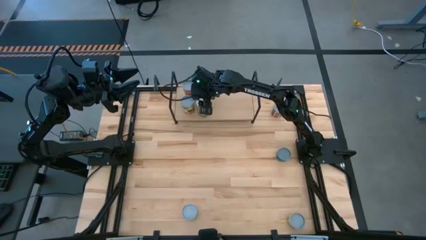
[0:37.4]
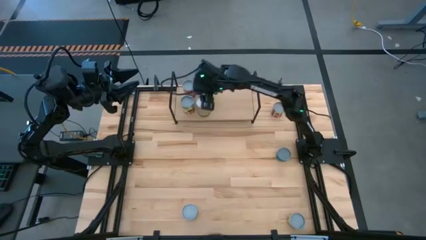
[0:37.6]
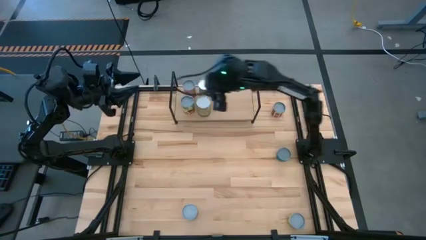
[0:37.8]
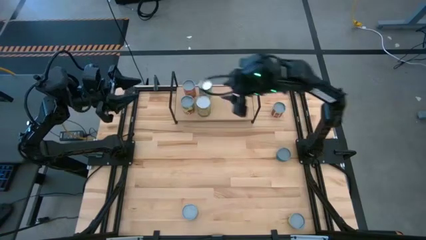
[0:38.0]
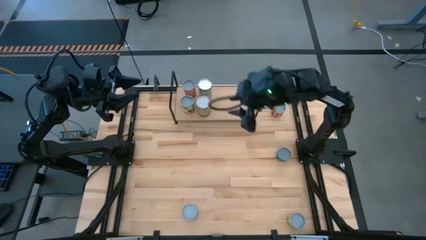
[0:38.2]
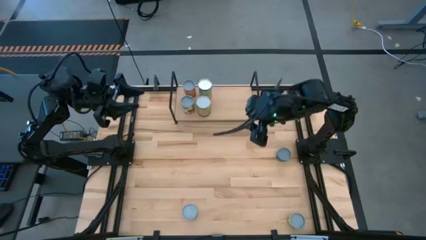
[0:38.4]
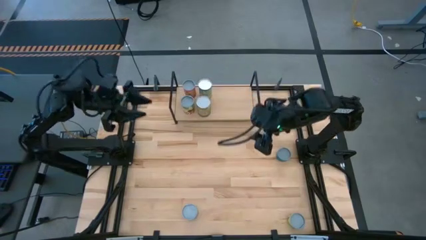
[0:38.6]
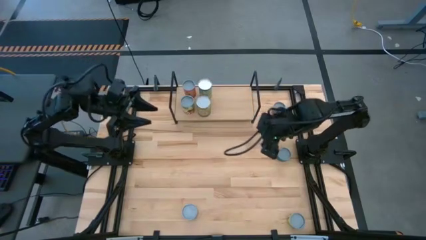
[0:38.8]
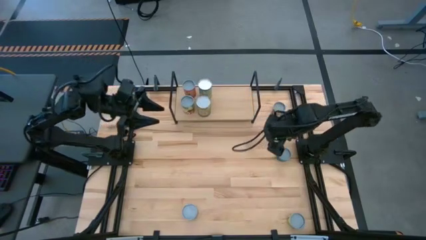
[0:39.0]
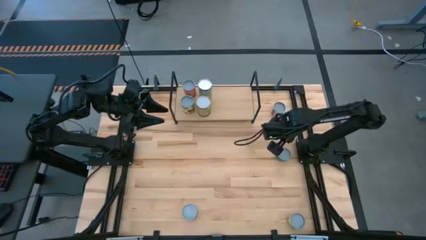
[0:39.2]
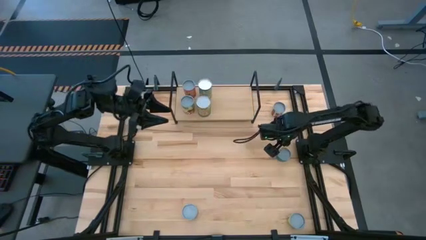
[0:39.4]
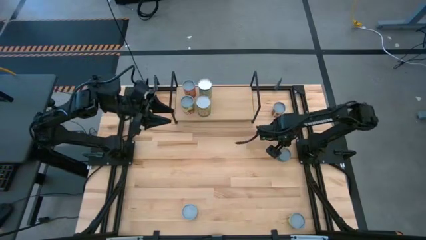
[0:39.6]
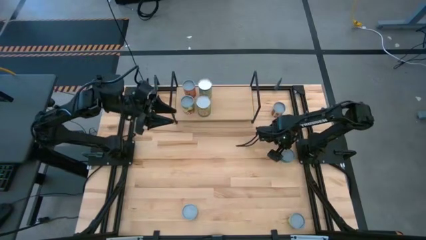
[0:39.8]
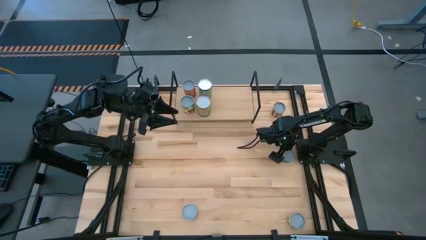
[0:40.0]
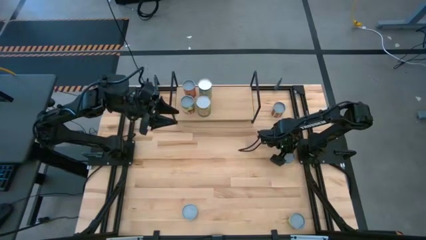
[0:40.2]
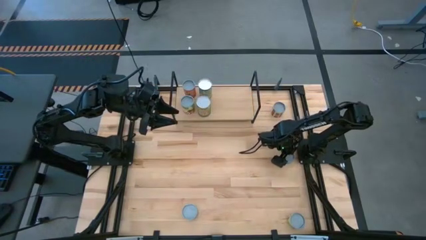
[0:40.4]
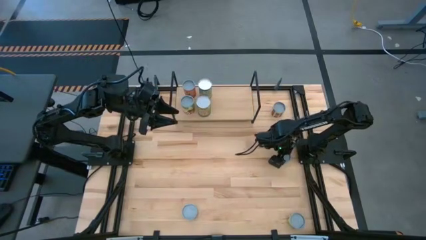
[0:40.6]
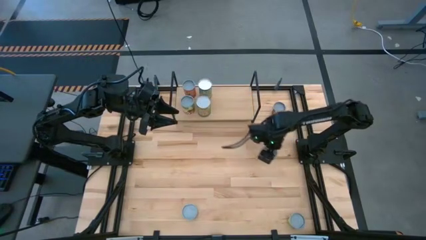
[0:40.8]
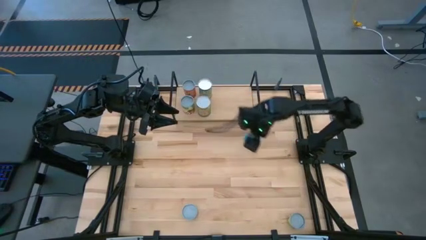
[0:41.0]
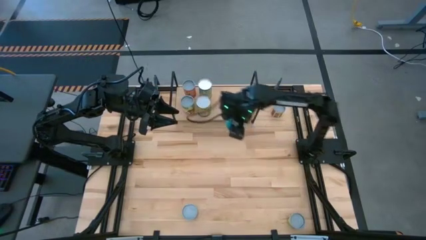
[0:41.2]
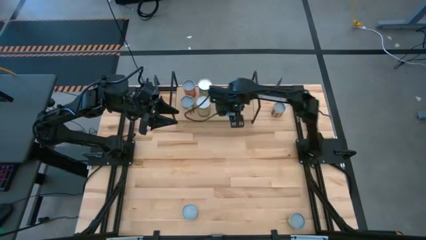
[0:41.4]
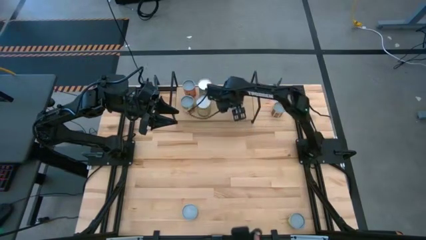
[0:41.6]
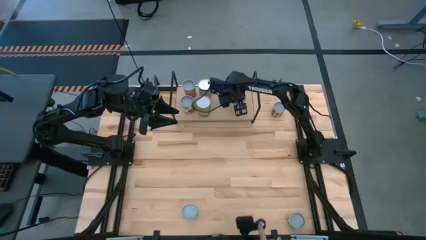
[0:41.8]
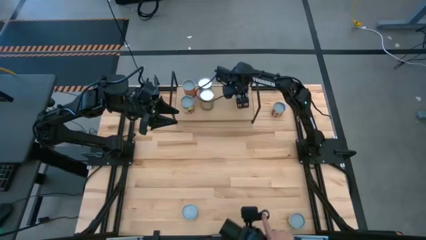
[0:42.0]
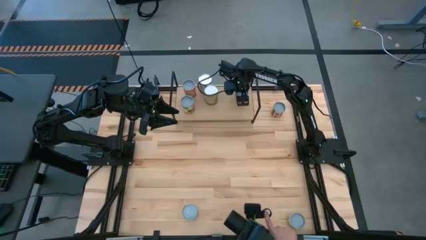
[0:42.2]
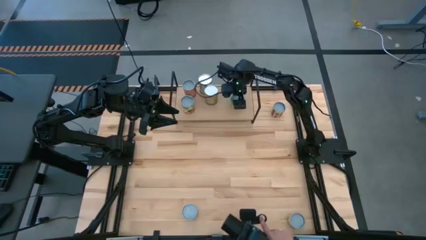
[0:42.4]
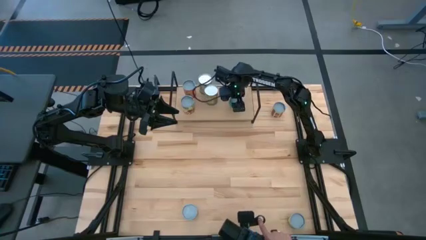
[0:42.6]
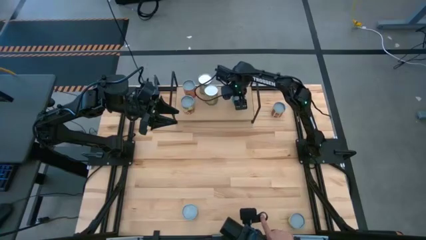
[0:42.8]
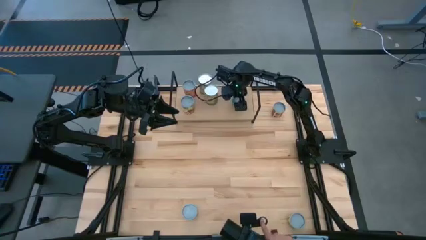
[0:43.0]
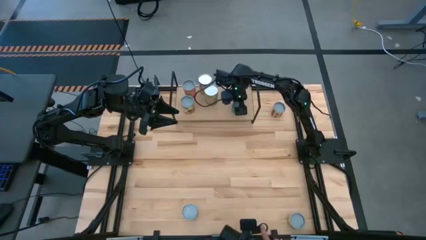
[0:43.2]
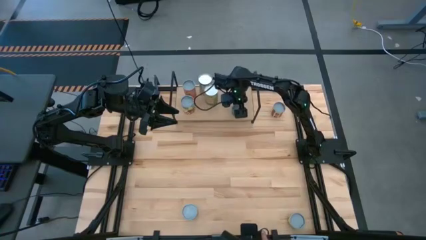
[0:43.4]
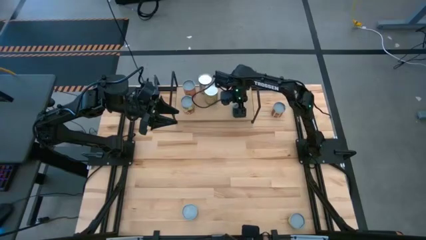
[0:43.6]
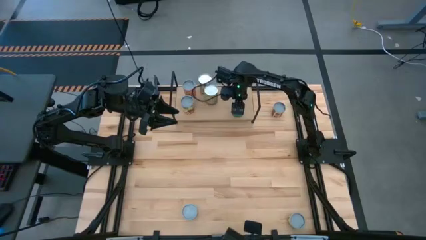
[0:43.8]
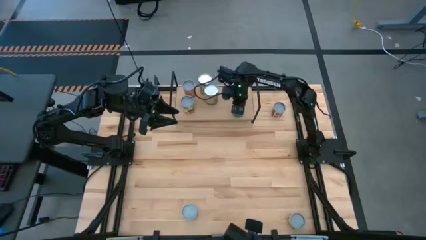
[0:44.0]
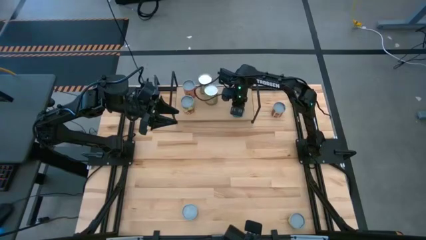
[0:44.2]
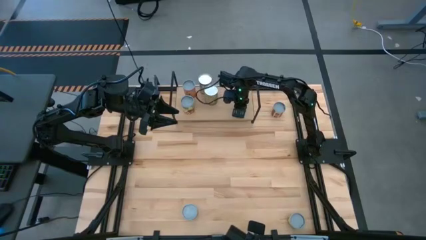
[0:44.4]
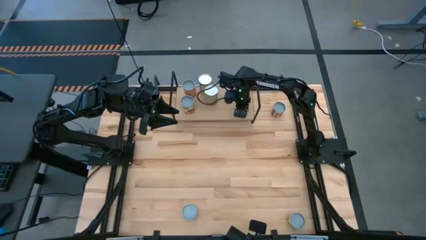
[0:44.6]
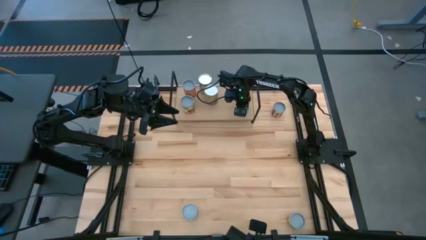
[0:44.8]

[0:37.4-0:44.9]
Task: Pick and place cans onto a shelf
Put the canned tuna on the shelf

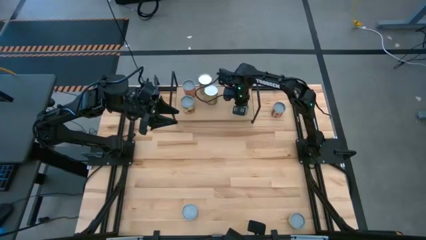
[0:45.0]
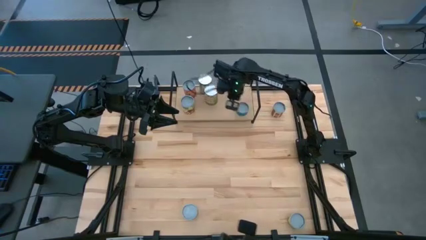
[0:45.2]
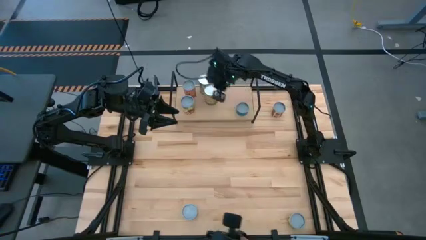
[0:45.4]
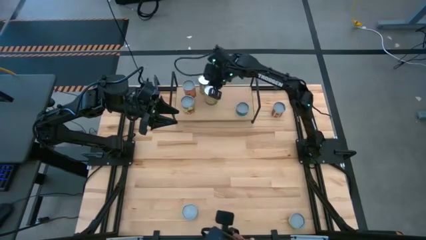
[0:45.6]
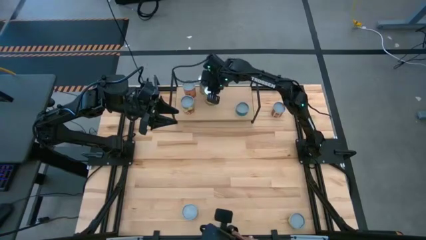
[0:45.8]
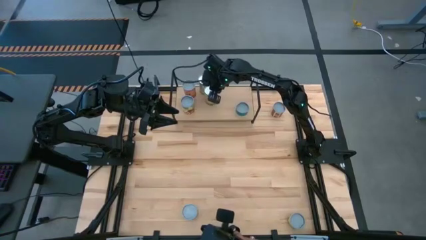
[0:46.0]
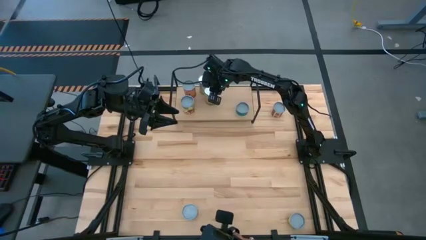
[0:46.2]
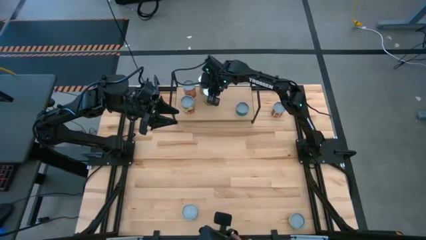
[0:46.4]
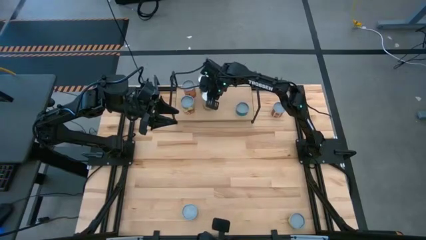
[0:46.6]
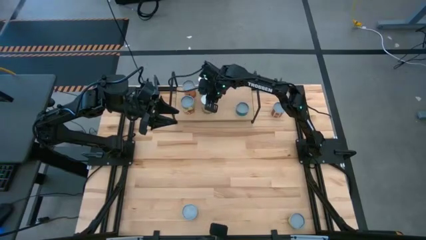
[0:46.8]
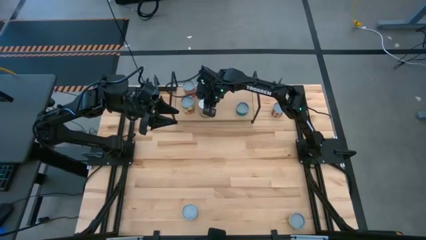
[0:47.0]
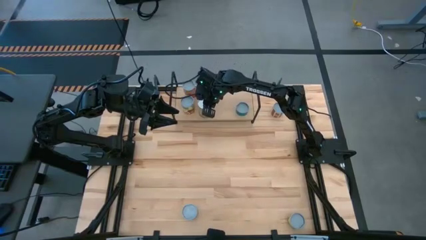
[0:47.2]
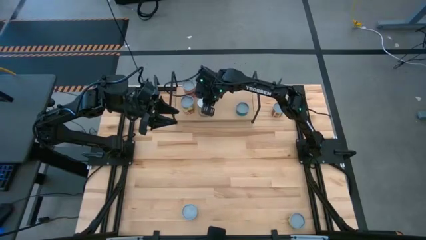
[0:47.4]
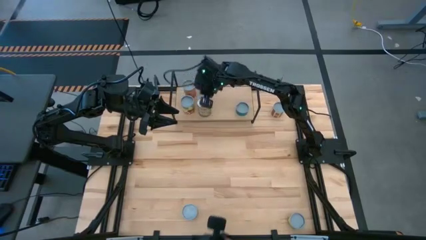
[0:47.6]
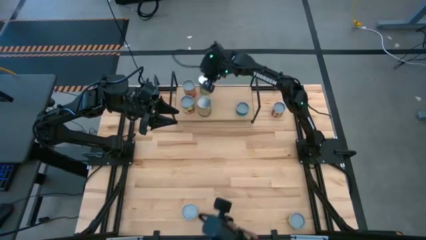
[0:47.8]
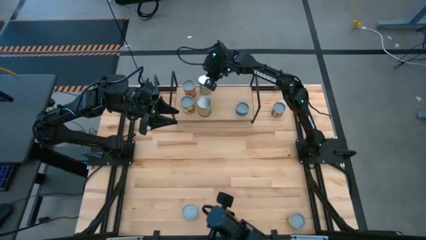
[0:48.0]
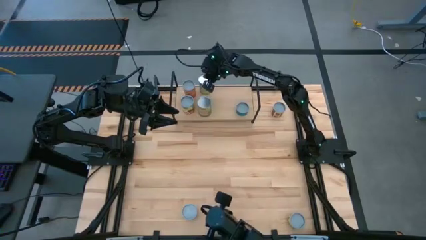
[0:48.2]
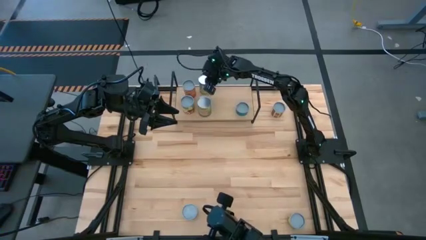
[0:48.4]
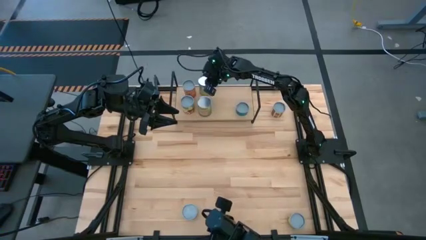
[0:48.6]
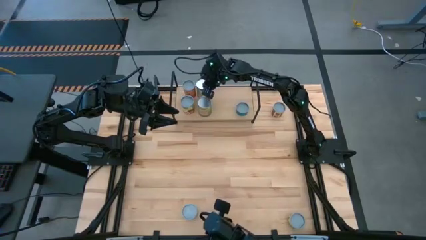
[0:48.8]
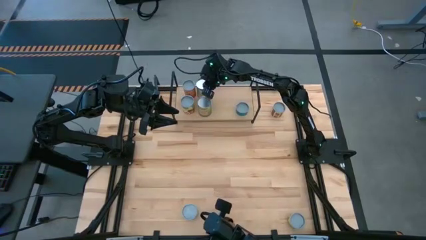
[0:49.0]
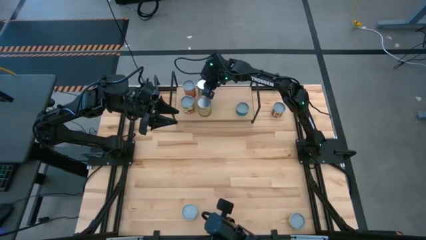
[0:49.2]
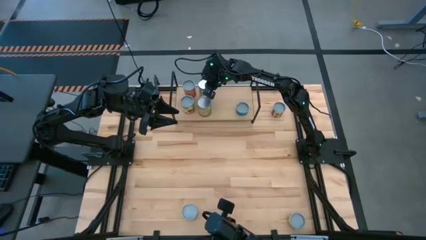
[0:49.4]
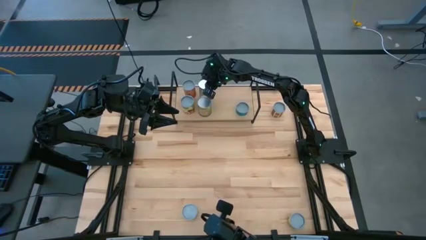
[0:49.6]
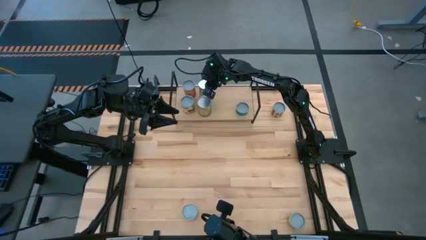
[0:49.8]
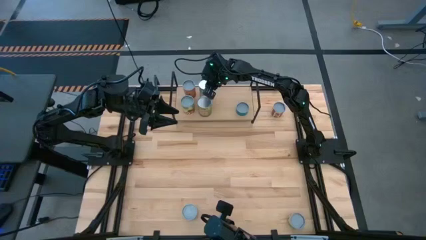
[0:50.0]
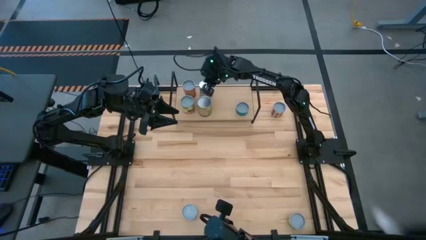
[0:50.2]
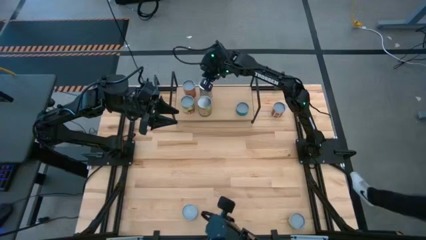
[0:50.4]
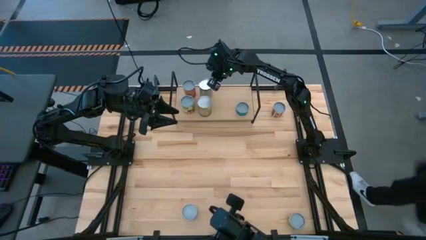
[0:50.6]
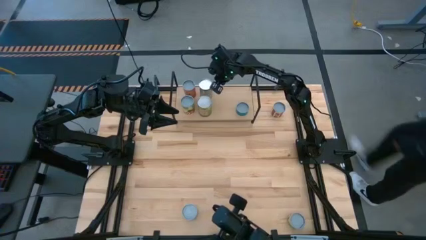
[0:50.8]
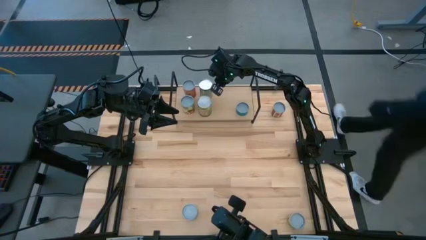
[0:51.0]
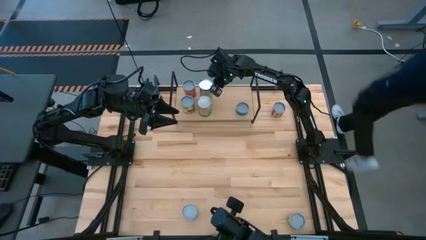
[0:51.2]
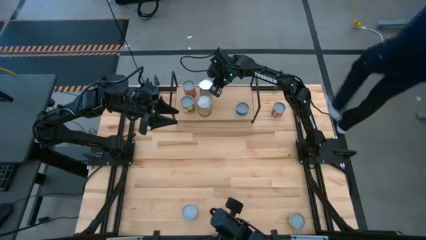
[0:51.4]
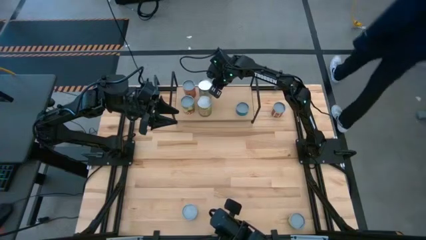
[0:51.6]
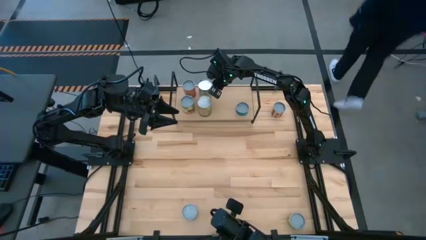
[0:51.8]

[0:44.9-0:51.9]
Adjust the canned goods on the shelf
